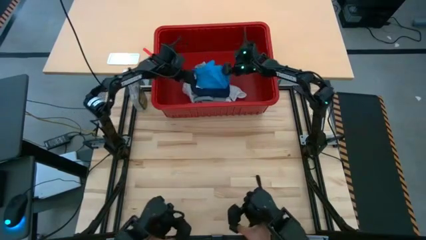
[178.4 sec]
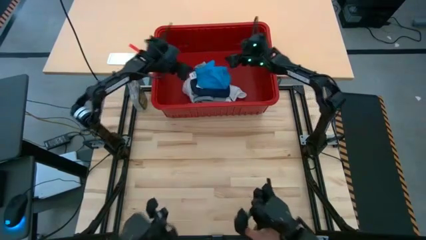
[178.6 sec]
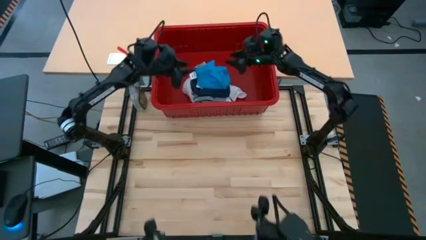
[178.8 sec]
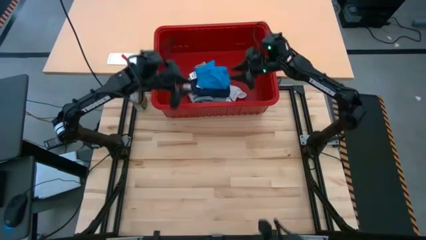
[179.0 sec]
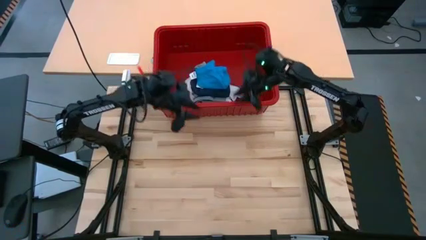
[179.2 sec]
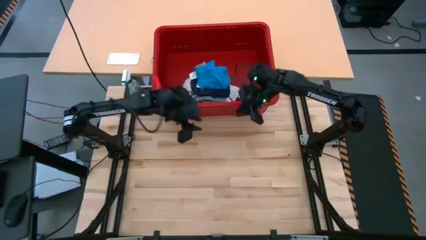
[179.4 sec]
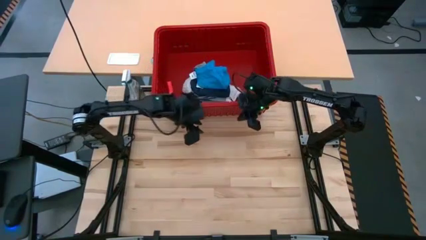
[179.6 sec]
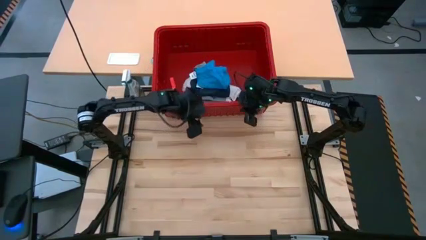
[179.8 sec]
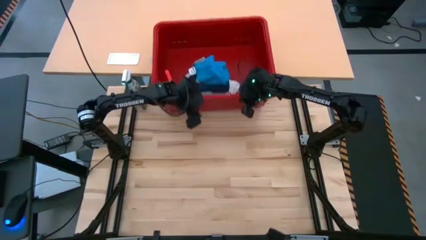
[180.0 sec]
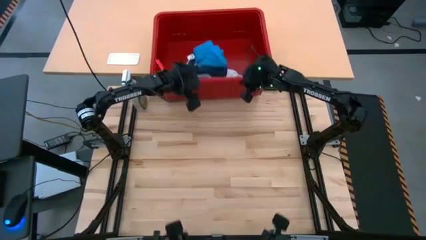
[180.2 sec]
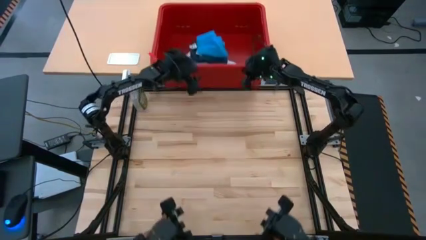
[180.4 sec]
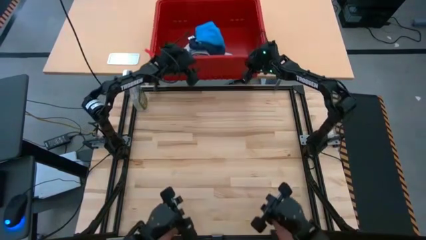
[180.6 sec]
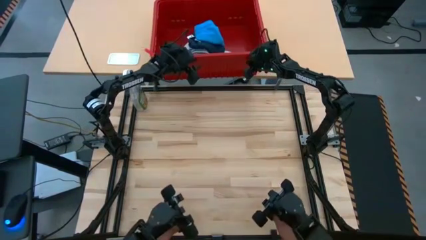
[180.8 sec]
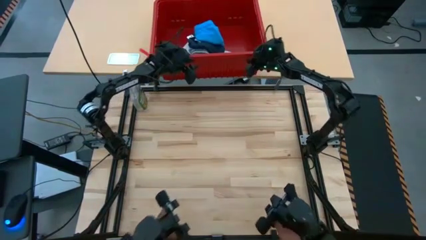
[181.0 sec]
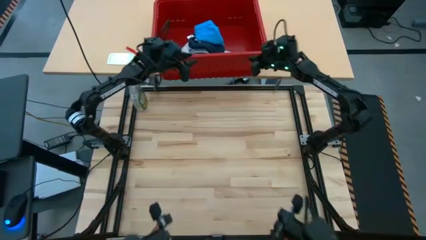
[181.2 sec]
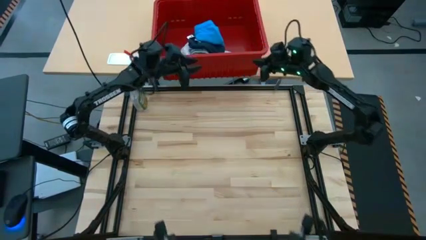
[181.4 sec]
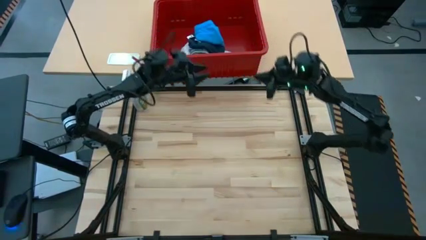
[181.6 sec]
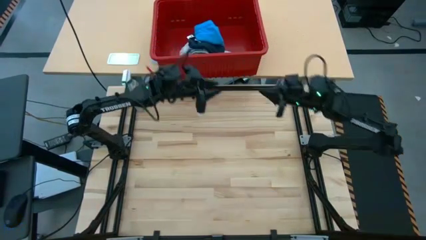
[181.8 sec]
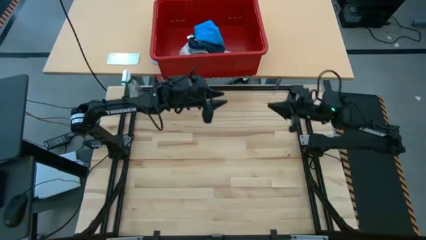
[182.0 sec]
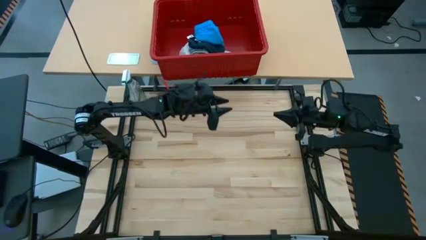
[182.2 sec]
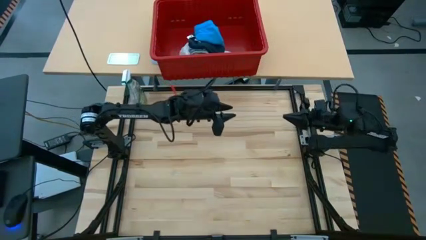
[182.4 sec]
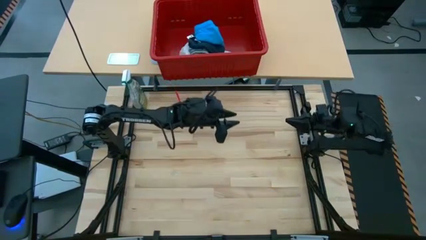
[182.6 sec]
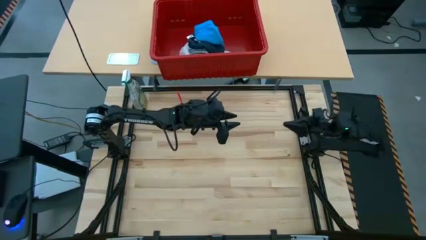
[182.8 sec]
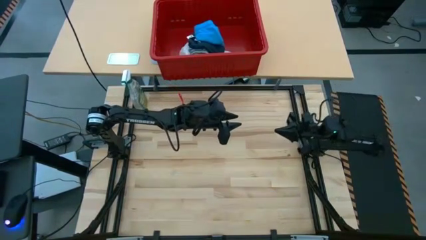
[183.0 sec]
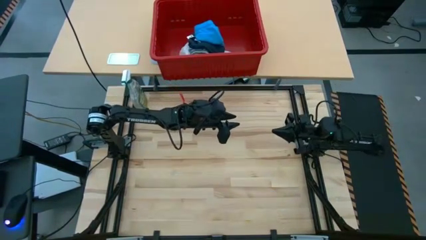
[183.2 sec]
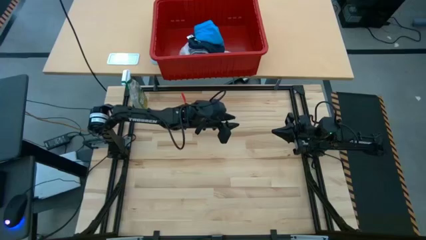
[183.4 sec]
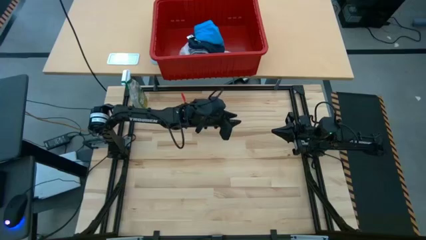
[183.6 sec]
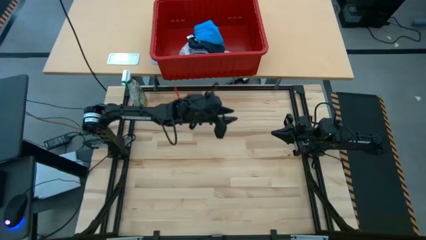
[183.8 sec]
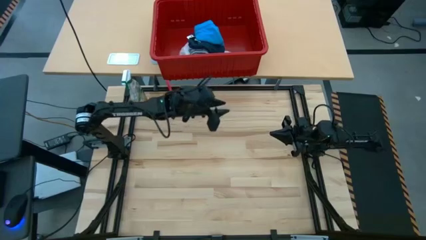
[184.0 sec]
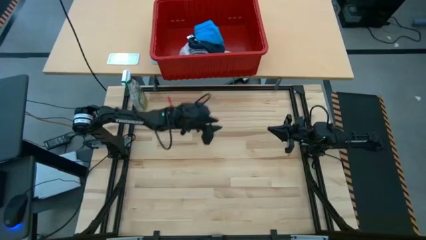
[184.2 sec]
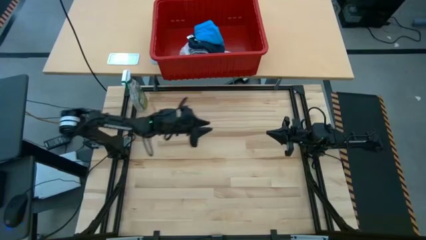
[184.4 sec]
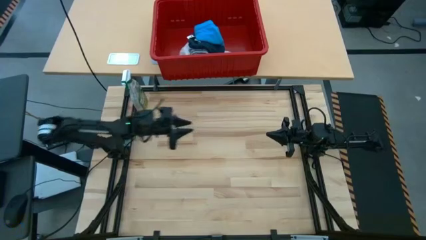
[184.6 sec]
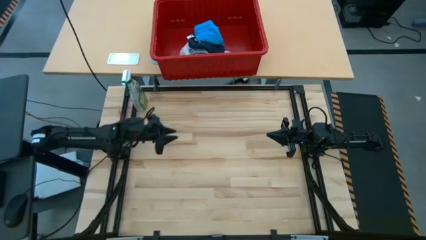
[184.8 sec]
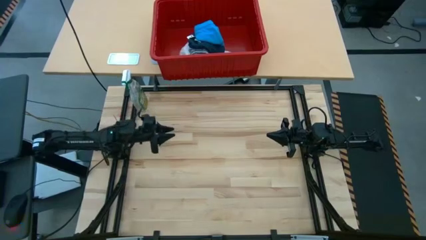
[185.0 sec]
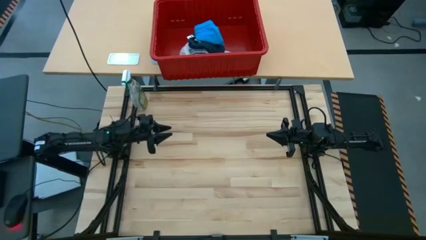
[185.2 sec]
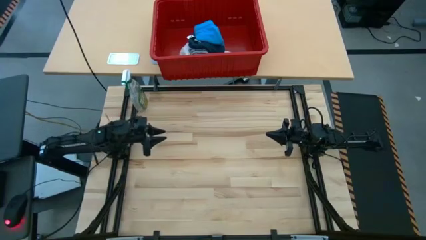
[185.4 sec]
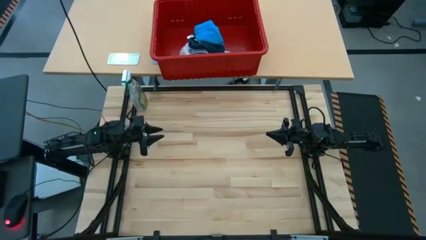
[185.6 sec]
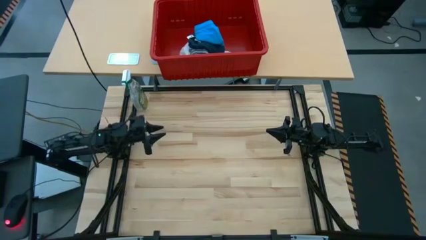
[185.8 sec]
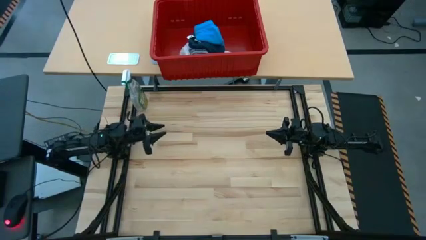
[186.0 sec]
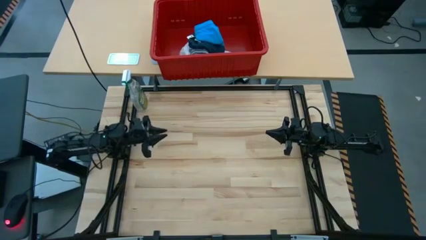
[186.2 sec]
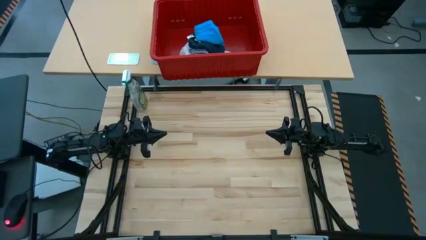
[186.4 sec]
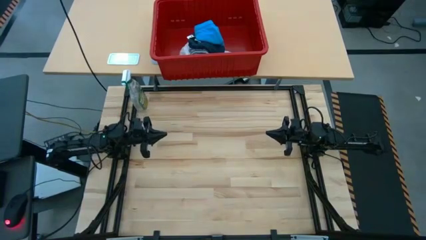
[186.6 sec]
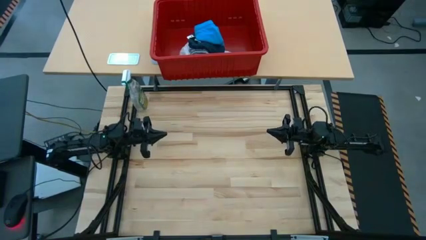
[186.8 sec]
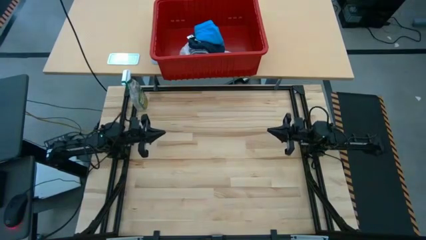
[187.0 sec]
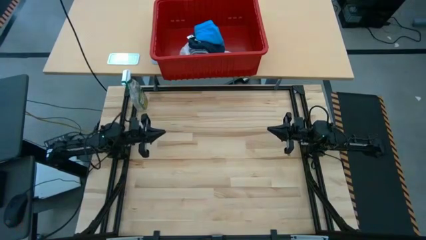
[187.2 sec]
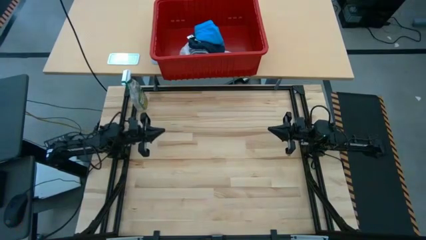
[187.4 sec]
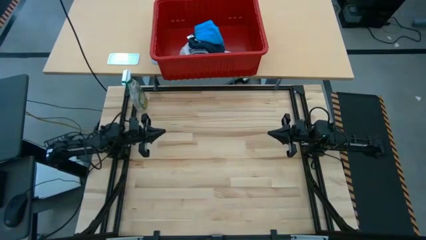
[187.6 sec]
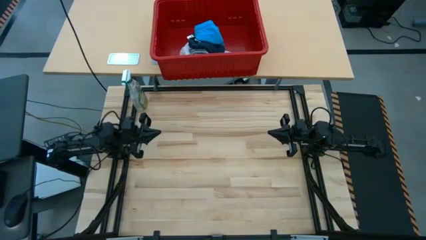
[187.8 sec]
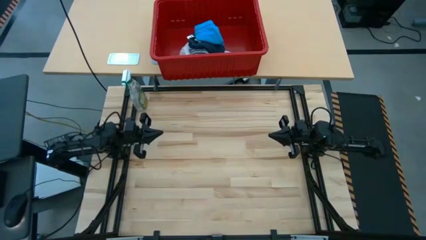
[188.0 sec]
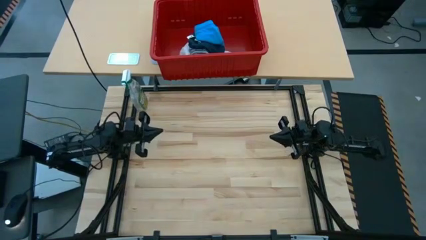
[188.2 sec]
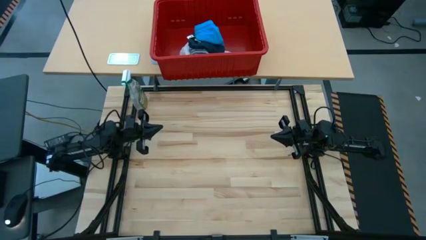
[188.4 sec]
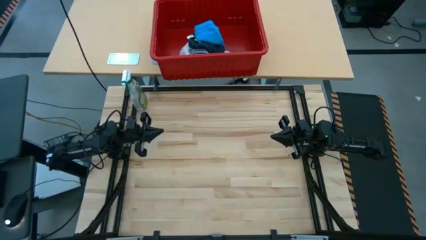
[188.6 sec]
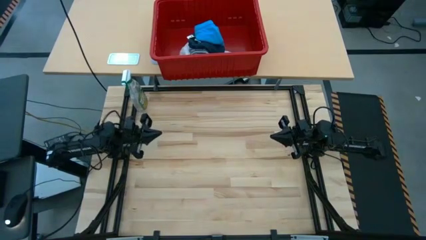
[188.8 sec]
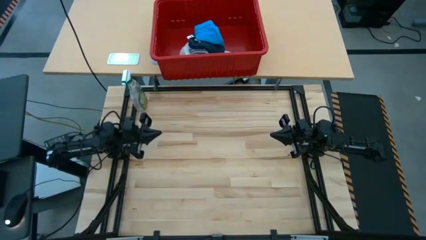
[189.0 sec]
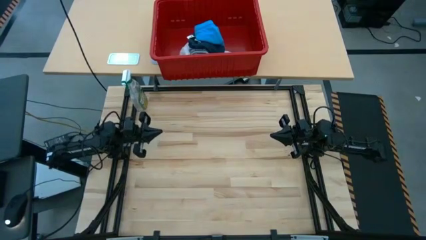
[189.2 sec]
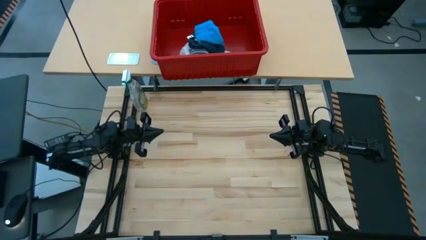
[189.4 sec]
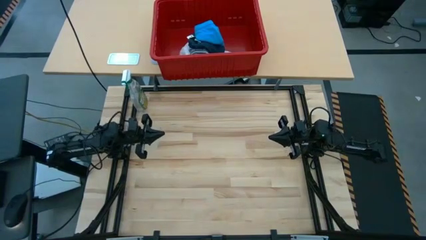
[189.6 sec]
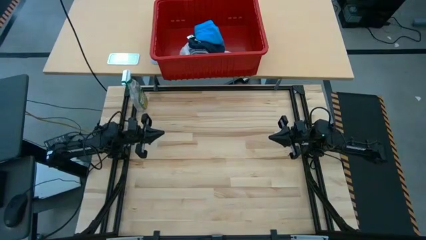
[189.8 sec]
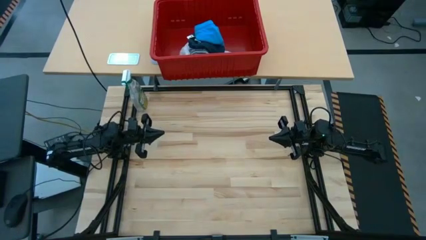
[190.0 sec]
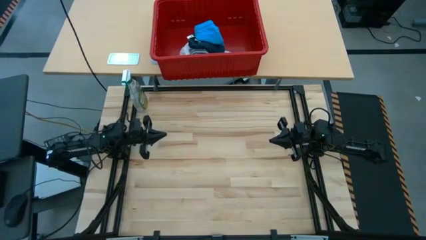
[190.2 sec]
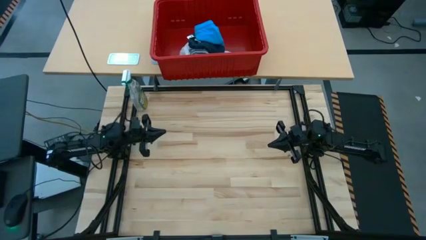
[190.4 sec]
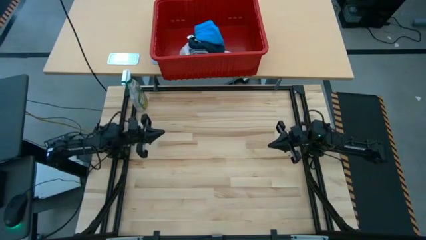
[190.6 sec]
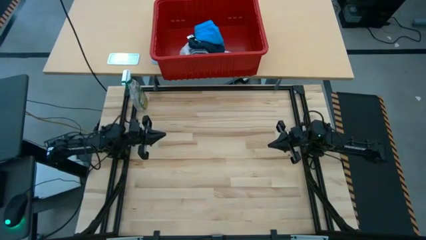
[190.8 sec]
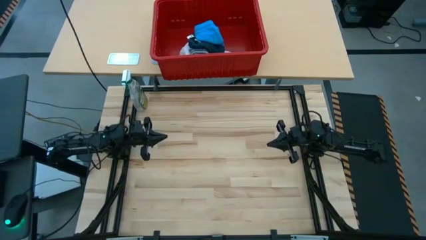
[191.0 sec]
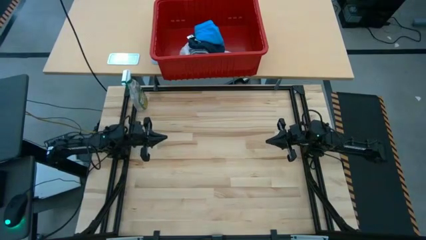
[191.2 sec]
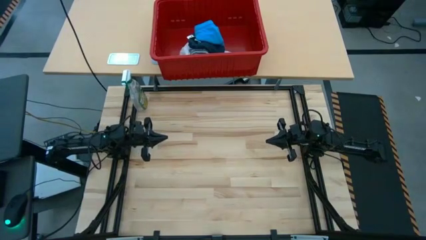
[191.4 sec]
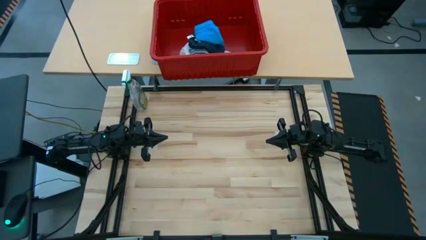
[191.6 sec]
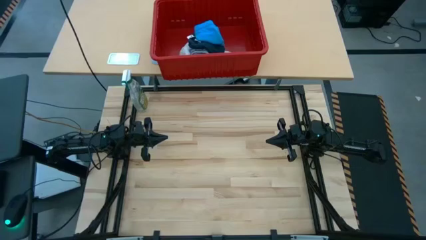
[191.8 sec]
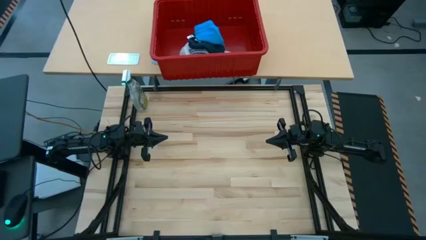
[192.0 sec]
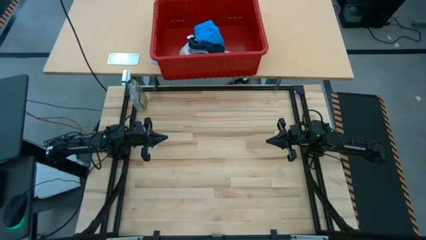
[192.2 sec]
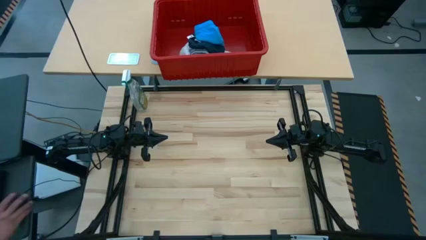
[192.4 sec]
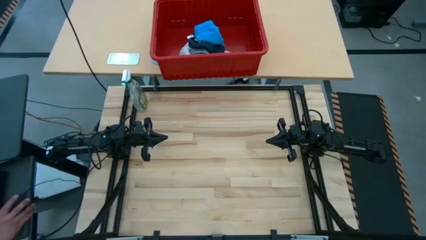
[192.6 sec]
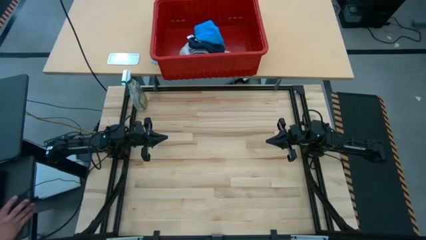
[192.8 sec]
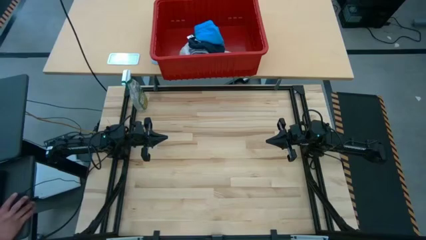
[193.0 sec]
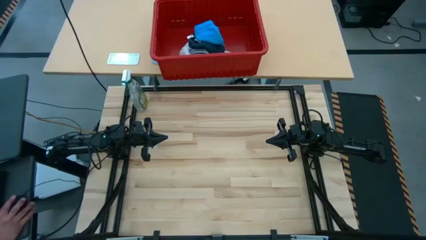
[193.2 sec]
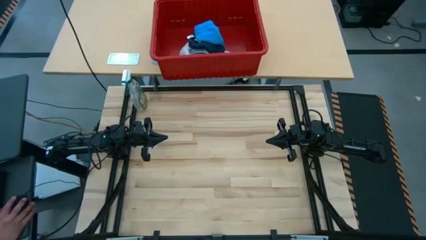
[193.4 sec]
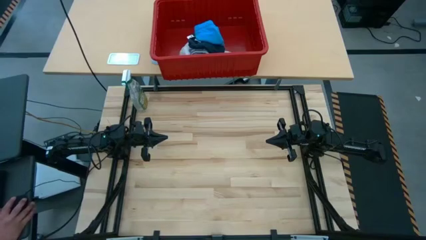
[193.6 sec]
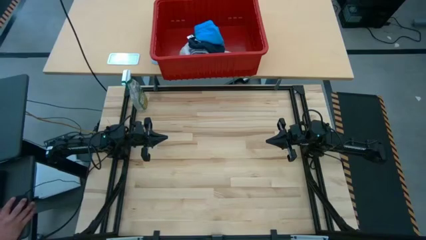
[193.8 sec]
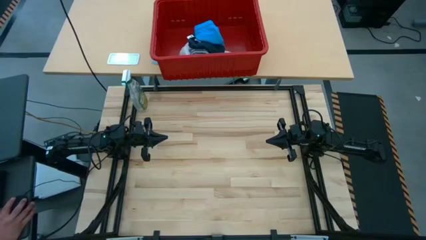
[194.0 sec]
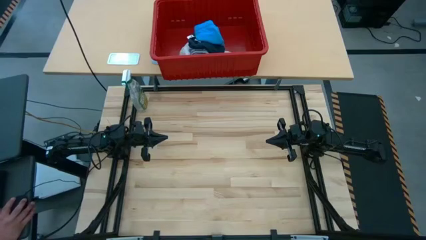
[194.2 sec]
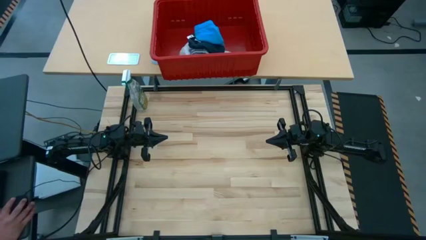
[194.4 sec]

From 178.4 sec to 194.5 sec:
Task: Fold laundry
Return to Home Position
